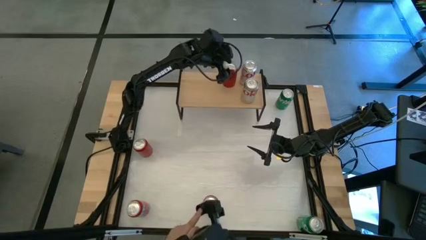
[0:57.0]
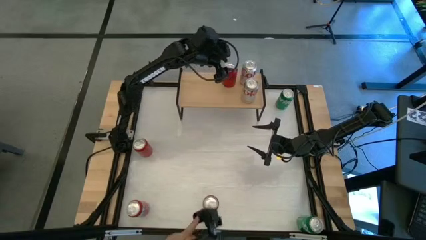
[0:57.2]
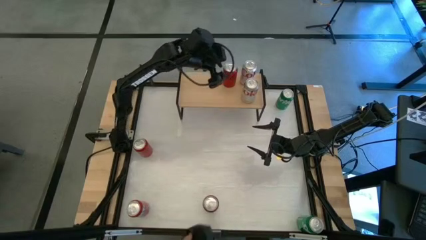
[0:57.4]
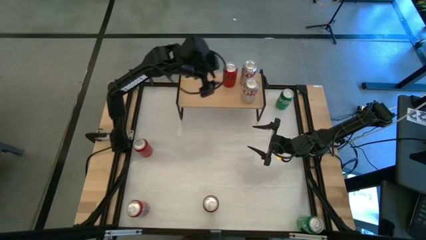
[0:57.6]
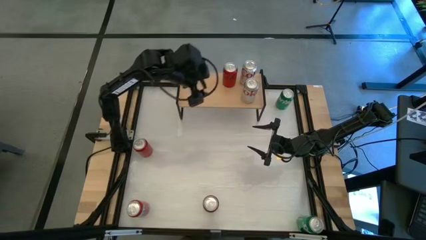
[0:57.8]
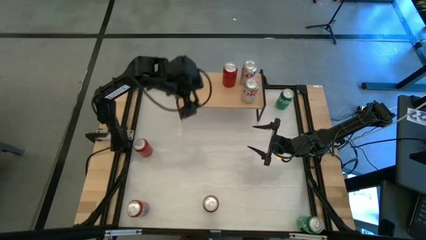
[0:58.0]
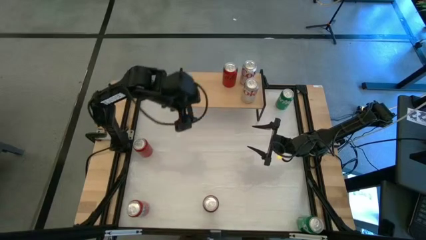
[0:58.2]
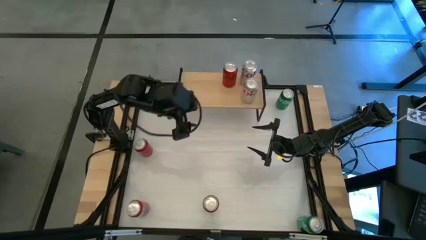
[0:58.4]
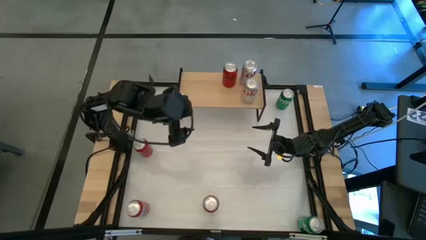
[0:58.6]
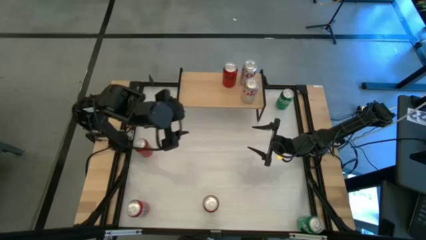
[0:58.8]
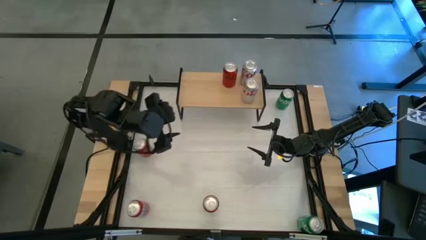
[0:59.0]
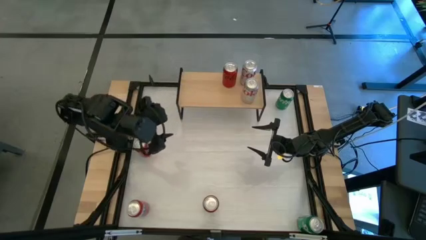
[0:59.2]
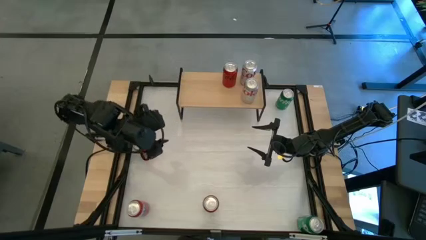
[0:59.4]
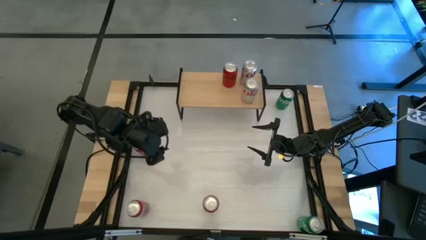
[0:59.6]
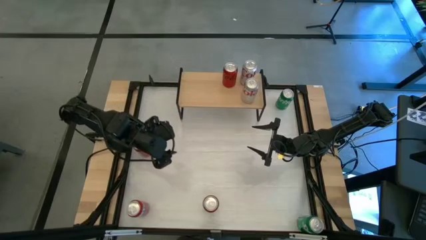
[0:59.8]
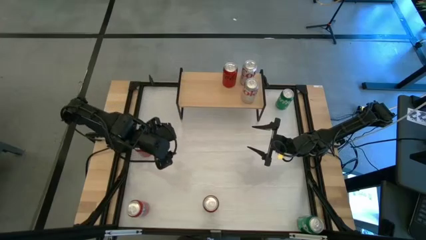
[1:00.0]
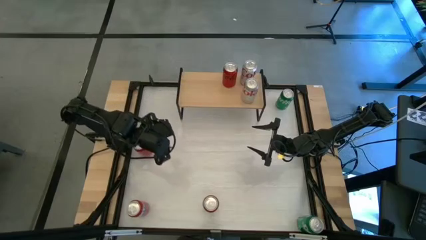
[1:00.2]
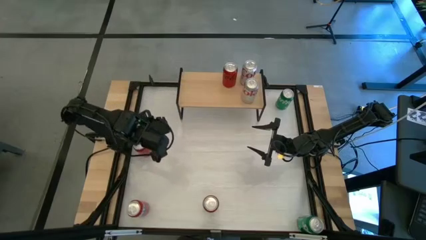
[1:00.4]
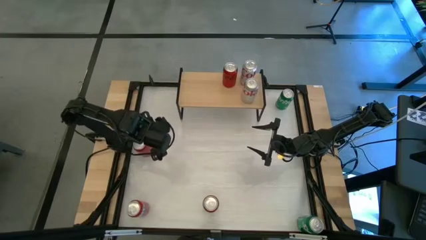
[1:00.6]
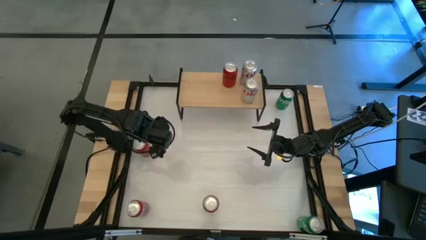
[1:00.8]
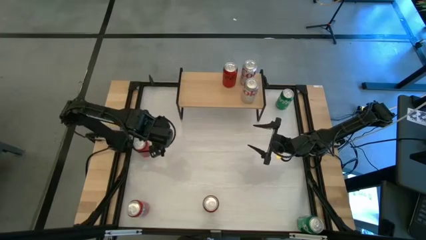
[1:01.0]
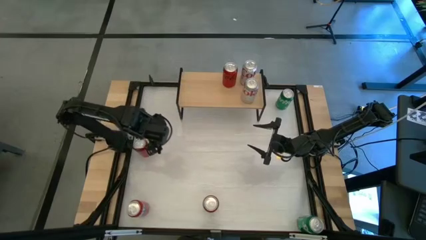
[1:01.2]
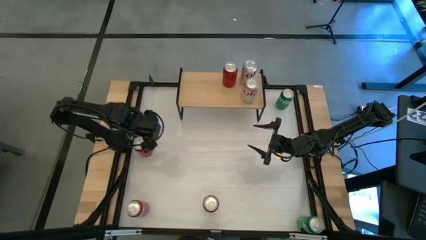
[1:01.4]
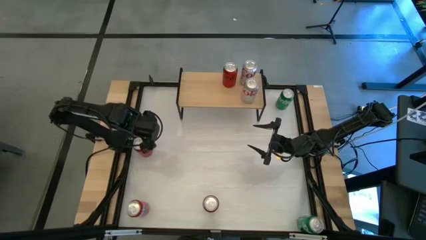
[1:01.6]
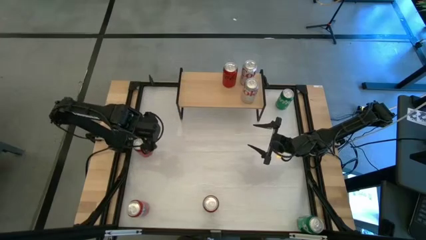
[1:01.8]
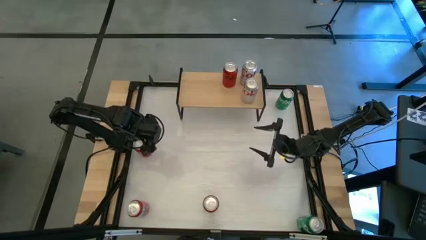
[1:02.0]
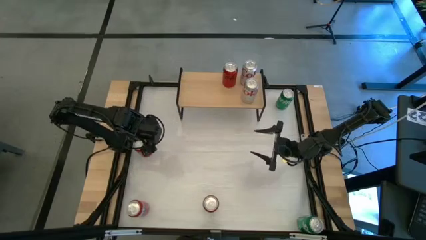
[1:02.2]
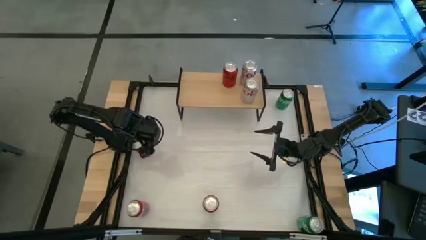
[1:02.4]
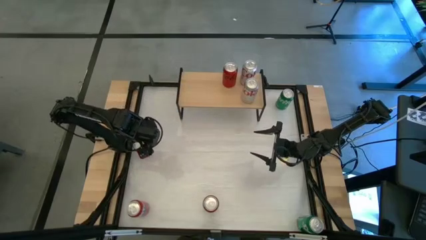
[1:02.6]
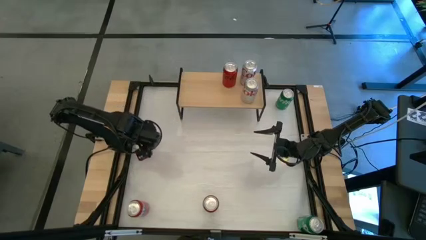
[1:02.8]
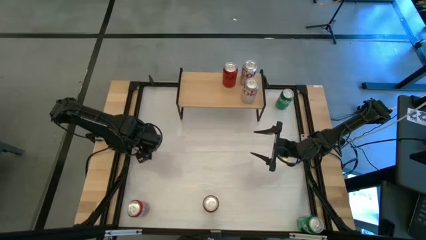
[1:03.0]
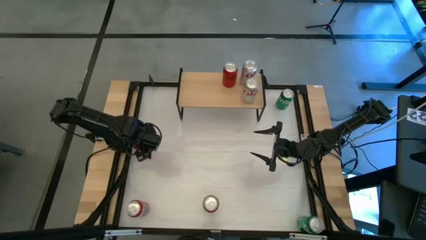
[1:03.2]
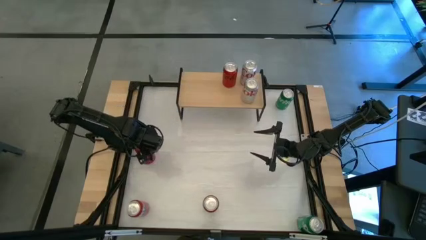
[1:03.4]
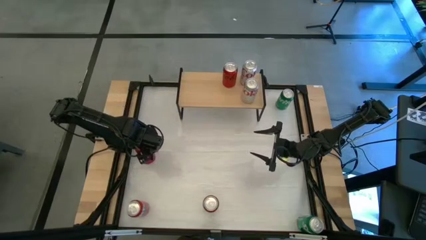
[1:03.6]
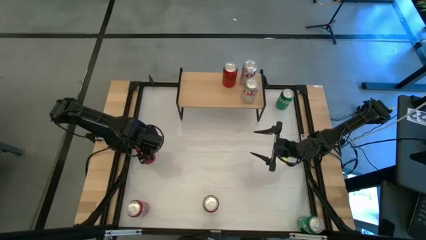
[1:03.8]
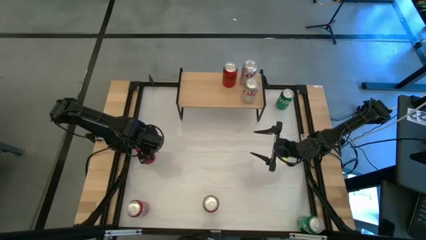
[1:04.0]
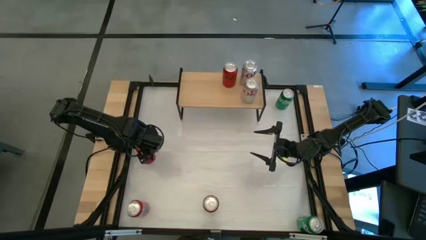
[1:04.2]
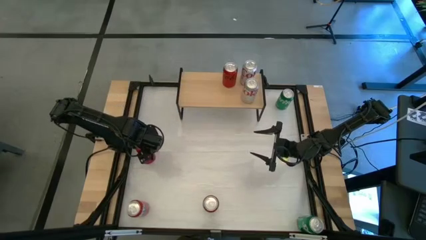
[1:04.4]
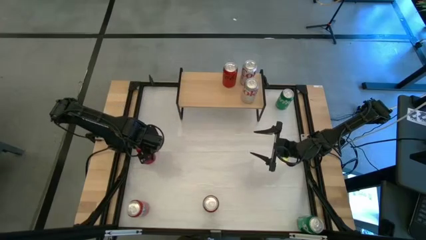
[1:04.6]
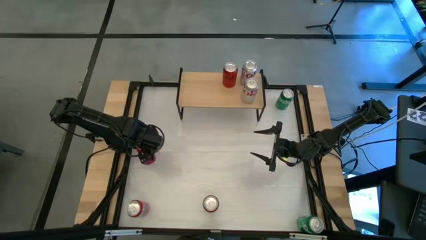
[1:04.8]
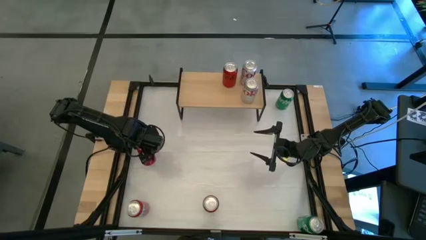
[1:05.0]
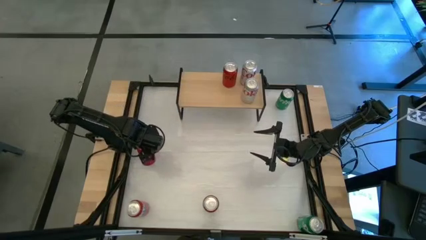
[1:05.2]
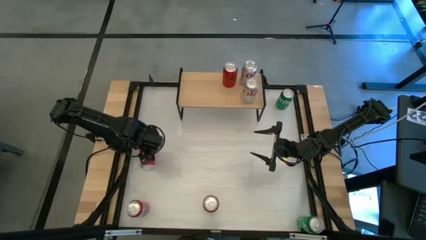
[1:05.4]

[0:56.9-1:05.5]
Task: Place canned beverage on shelf
Put the red black soda can on the shelf aligned with the other red black soda can

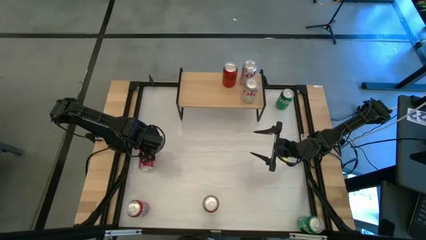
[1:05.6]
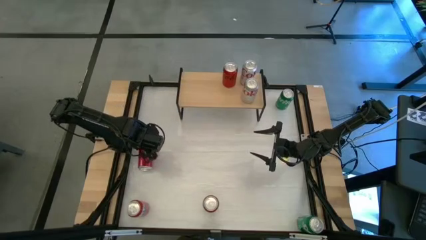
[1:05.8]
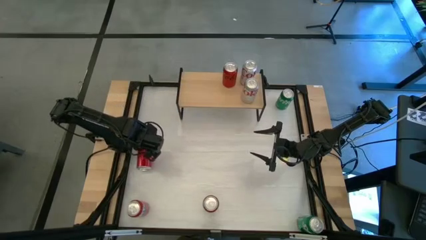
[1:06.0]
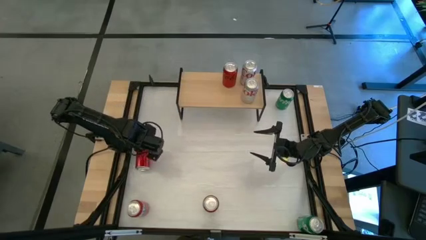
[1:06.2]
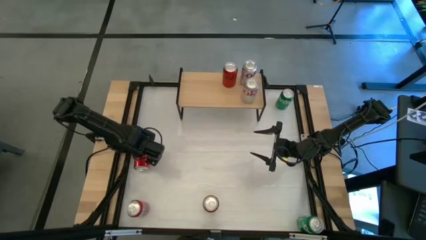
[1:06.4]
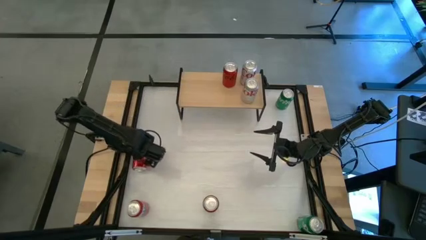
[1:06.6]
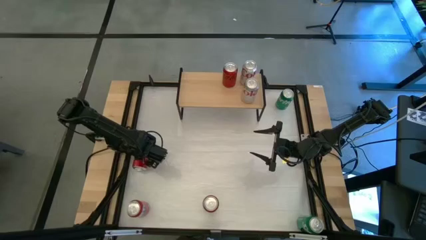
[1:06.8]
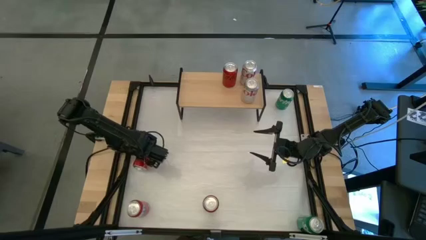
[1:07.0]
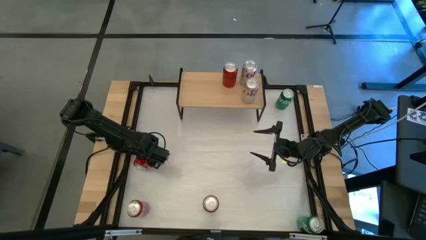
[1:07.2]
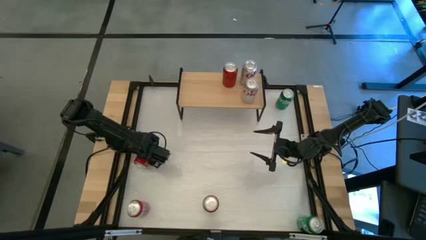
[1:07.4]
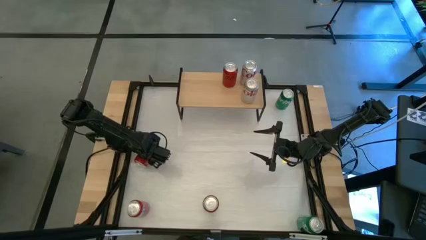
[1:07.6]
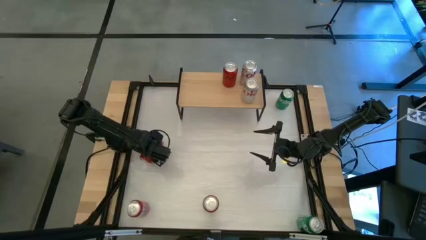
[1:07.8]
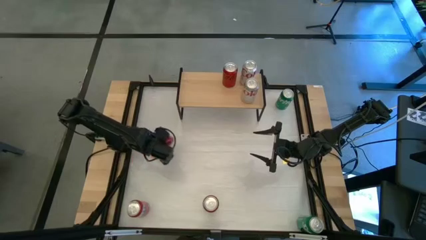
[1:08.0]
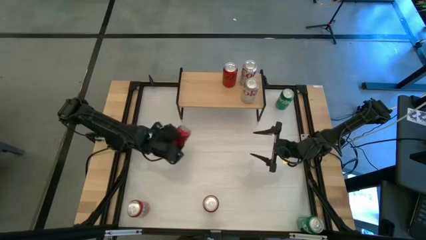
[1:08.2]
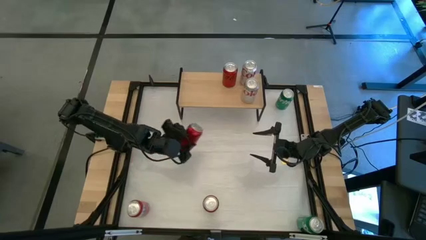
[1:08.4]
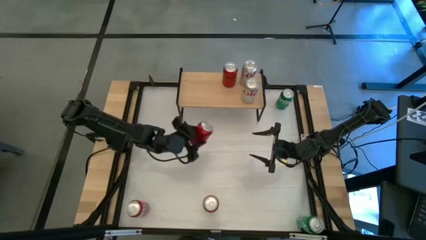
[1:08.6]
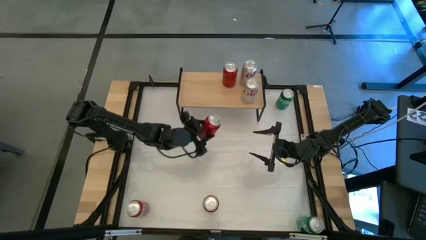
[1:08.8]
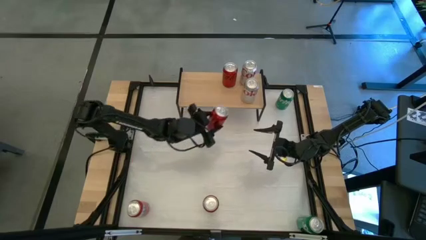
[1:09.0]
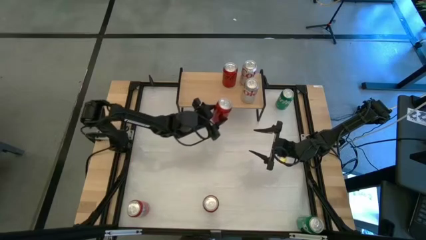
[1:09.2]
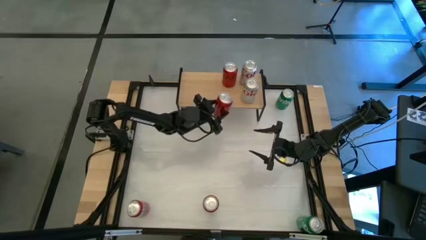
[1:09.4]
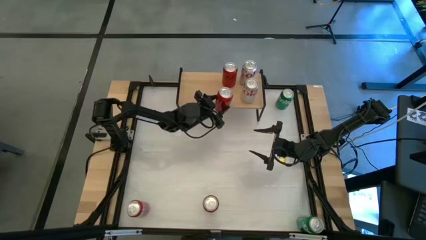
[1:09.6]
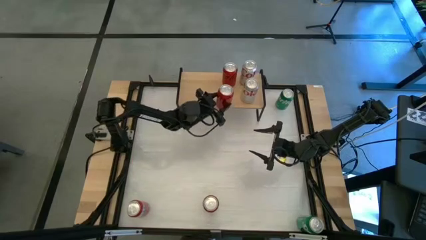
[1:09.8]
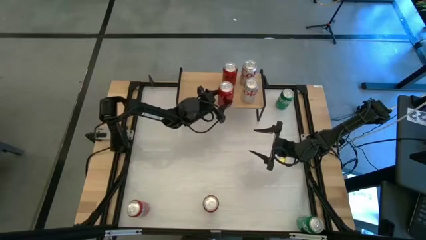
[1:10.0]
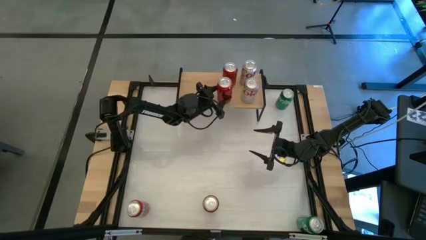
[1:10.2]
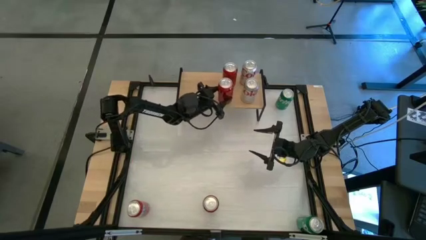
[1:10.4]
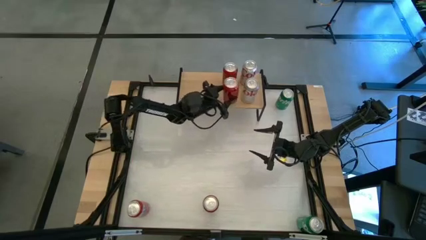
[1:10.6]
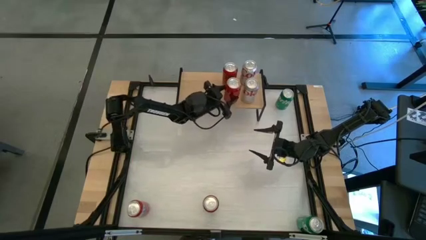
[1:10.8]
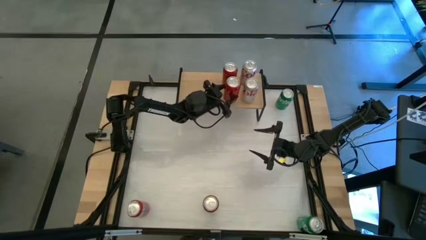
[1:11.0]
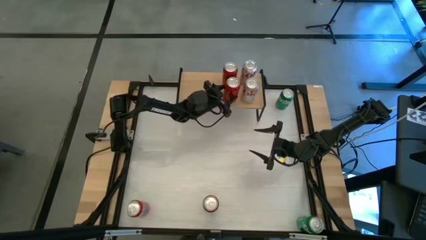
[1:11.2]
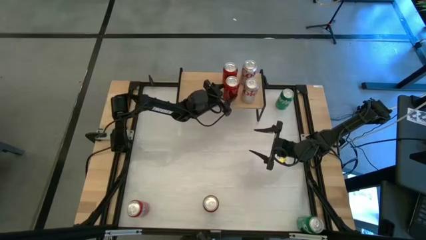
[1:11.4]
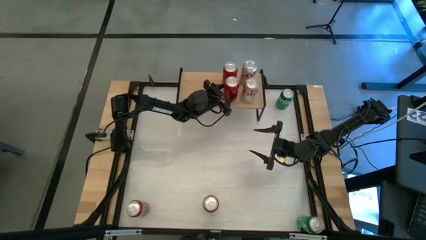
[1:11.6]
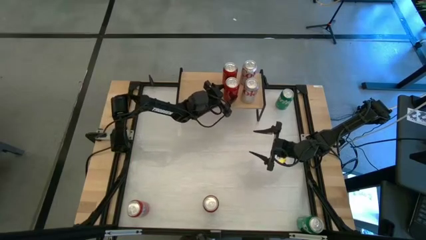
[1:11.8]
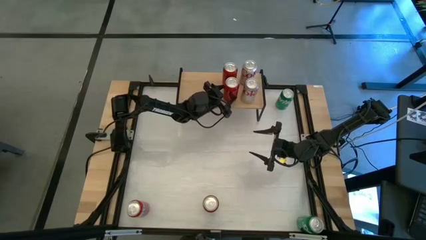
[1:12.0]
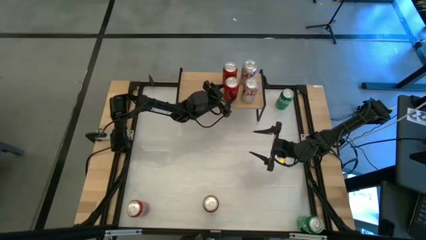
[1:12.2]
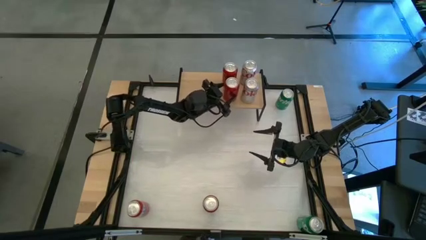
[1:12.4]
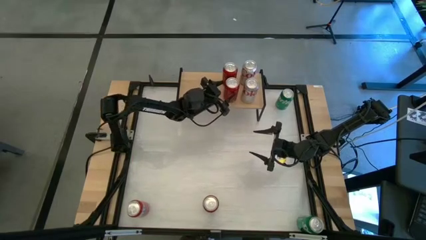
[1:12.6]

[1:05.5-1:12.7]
Put the red black soda can on the shelf aligned with the other red black soda can
